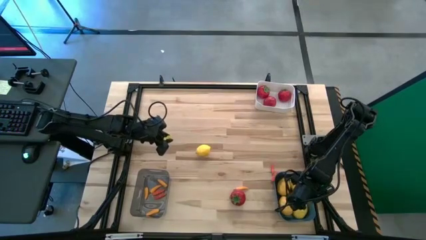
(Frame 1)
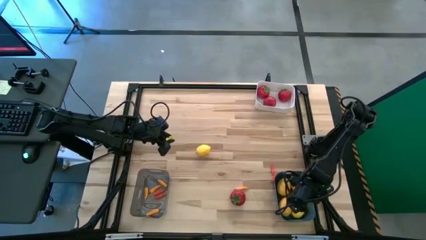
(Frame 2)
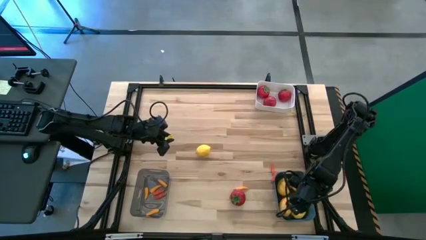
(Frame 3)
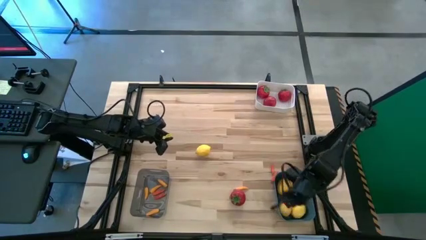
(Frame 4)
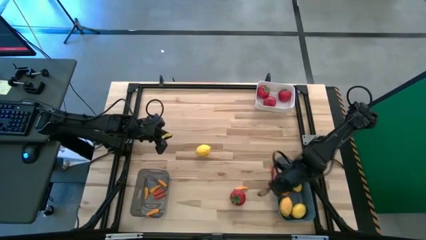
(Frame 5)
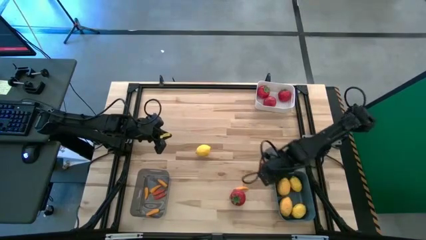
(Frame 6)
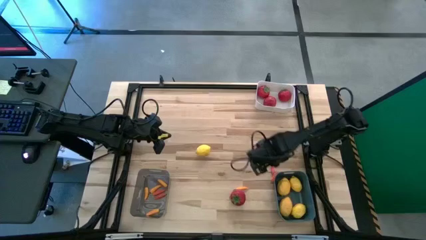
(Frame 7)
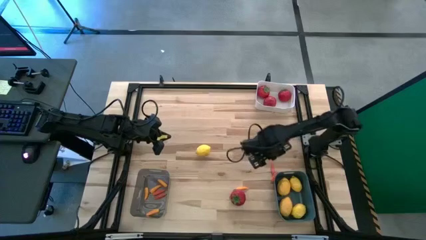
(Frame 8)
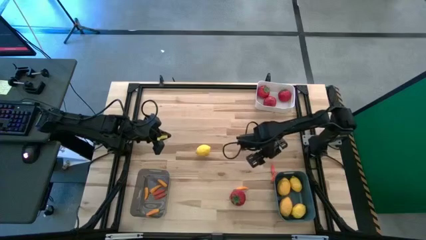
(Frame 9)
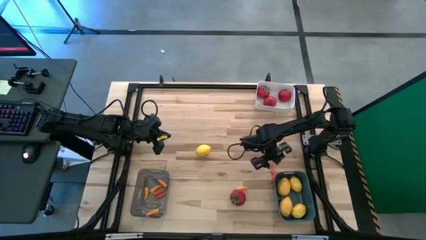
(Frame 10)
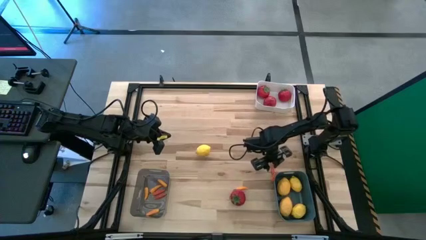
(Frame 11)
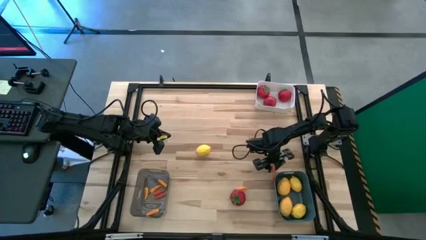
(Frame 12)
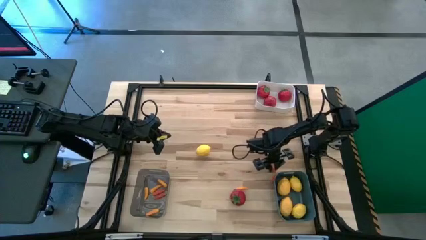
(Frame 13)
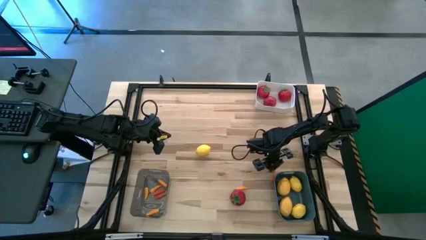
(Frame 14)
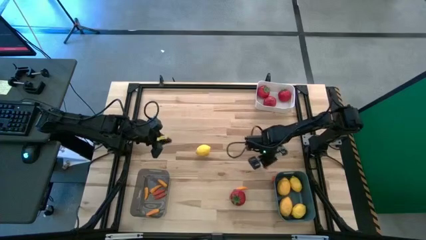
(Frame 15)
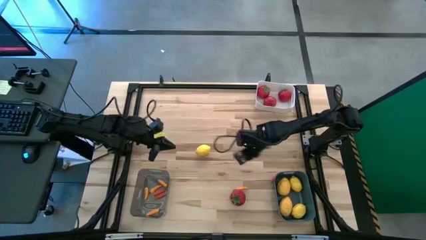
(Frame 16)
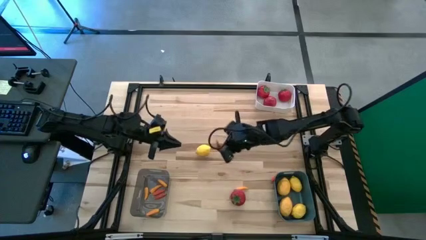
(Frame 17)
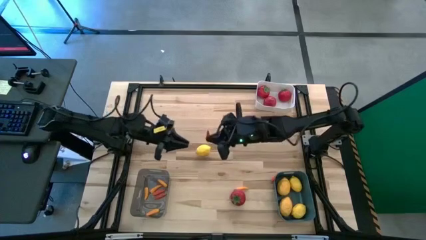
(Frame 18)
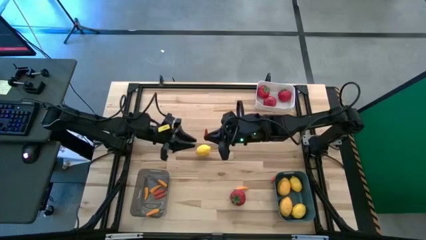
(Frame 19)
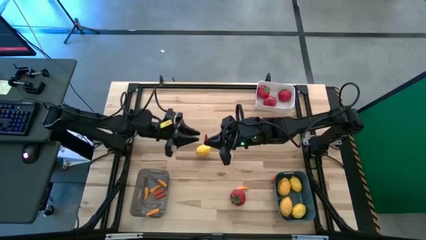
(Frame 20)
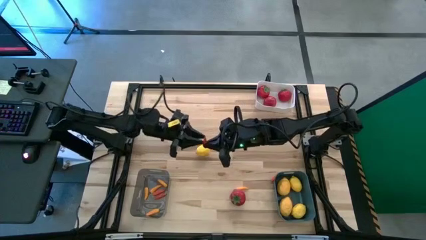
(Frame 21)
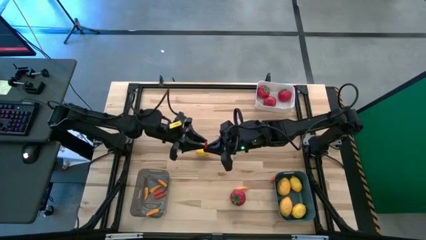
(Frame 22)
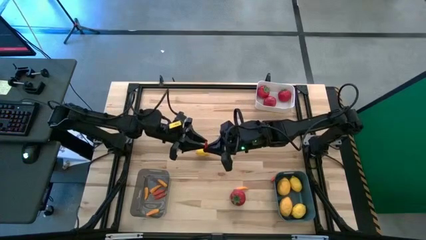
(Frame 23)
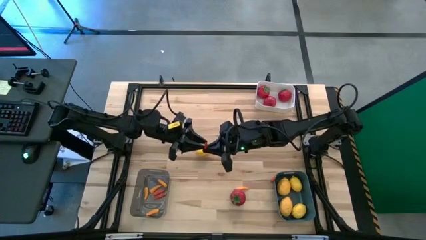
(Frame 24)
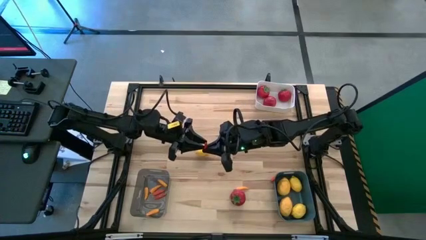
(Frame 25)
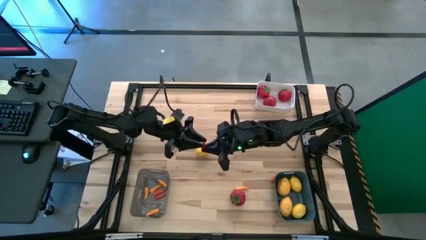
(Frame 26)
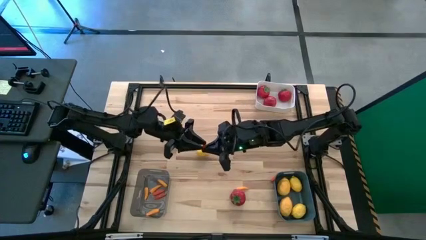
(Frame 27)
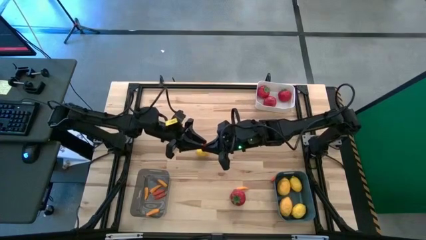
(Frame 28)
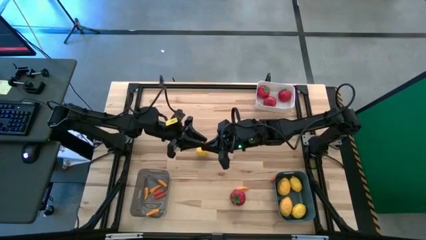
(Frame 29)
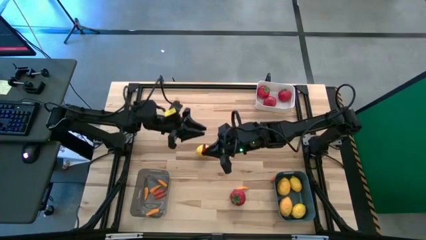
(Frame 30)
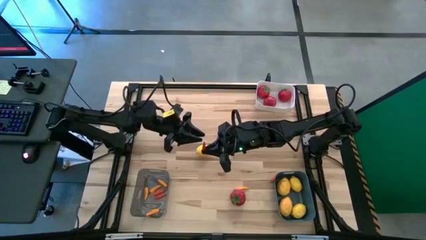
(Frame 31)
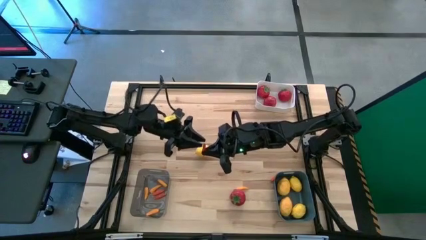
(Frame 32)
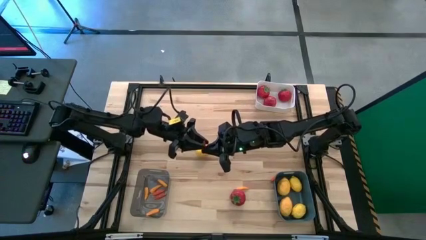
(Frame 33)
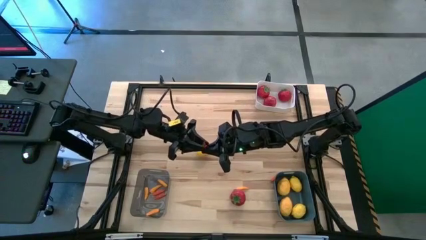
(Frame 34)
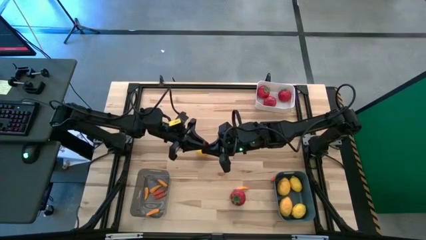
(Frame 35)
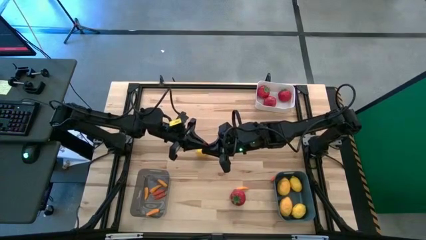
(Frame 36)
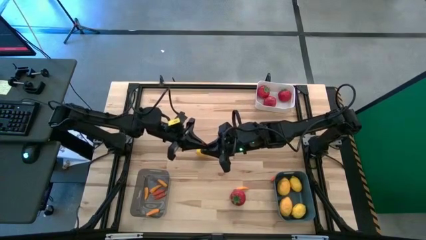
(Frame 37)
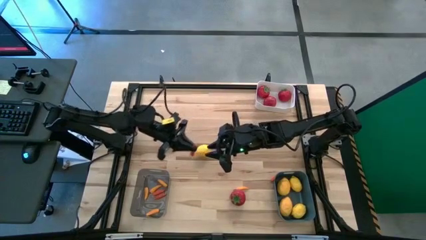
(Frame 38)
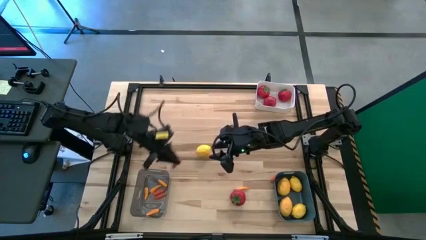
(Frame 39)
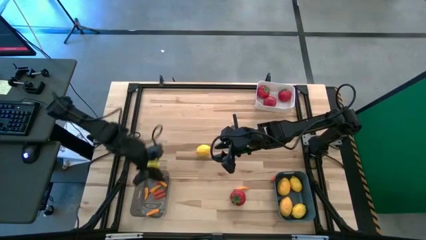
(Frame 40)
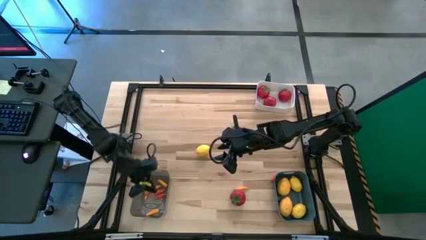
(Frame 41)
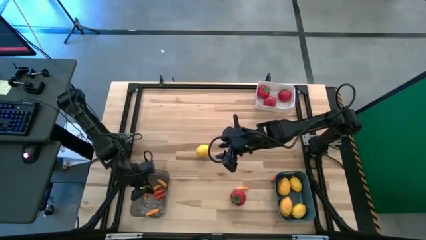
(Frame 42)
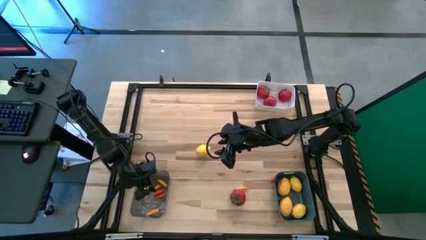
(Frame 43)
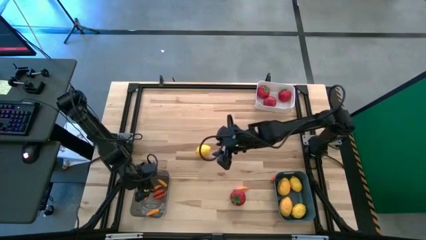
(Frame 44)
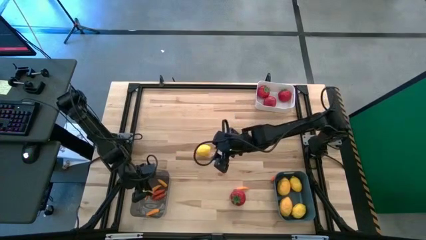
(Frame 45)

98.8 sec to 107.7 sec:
Task: Sort produce into baskets
Put the orange chili pepper into the black bin

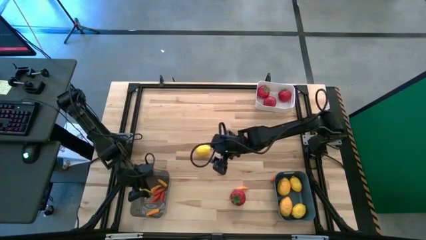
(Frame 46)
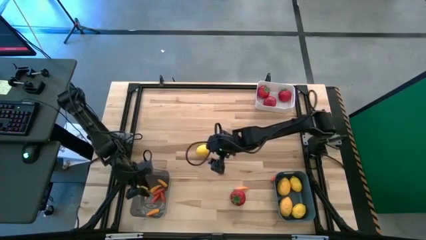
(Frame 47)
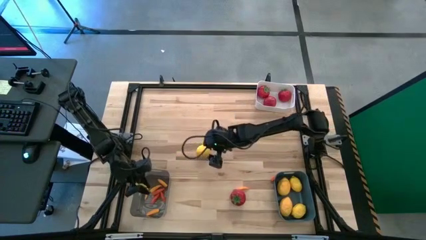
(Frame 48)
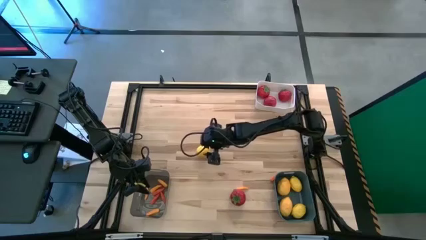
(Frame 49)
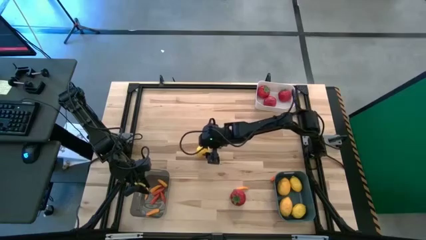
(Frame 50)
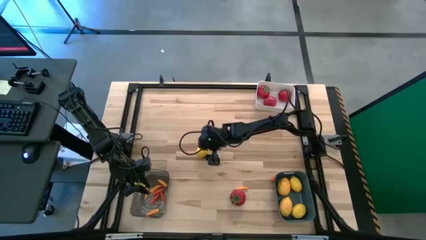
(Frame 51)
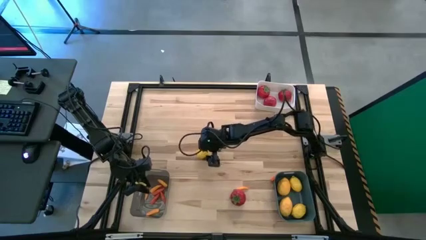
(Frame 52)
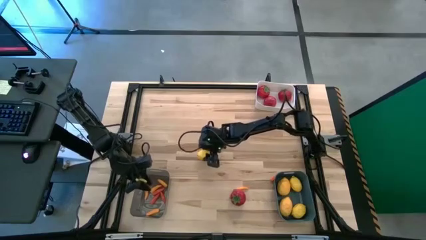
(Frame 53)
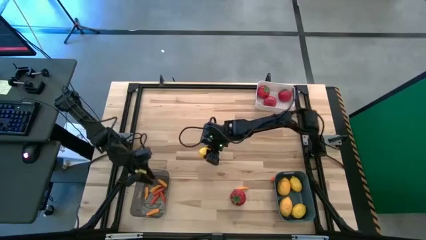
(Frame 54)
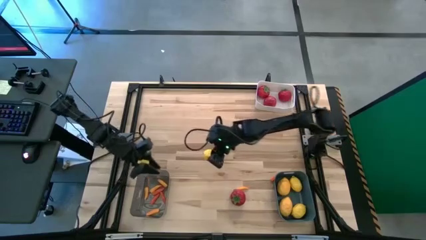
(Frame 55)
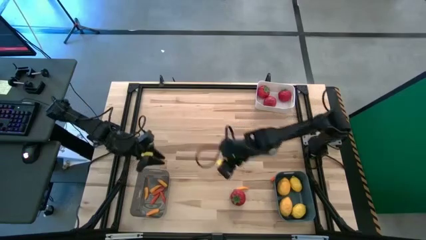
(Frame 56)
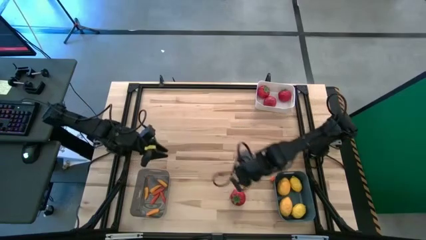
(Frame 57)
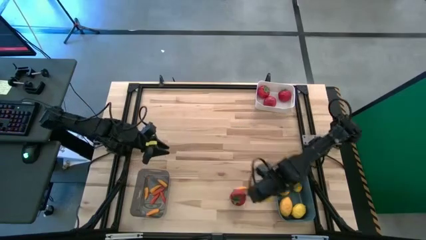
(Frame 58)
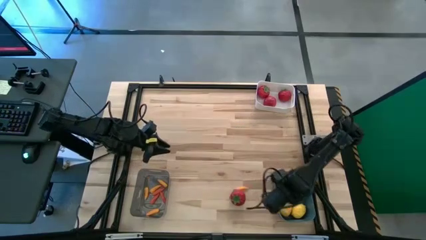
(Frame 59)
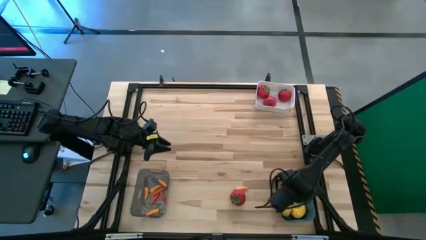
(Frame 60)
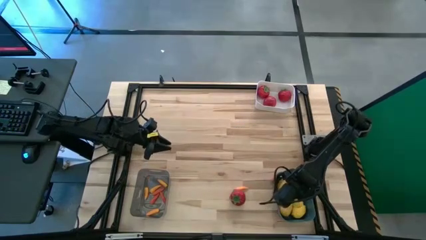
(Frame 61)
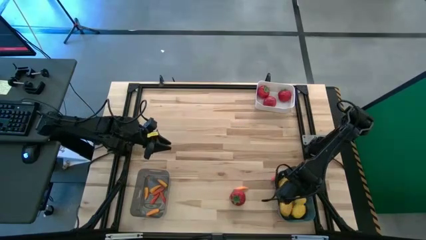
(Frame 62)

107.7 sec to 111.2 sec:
Put the lemon into the blue bin

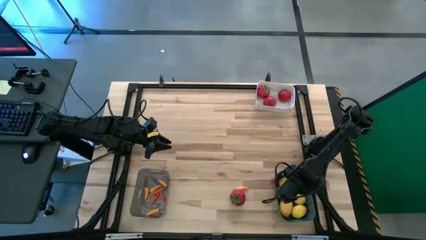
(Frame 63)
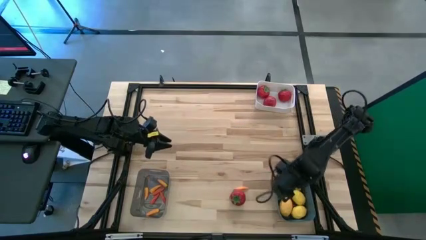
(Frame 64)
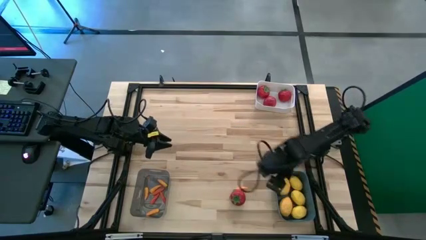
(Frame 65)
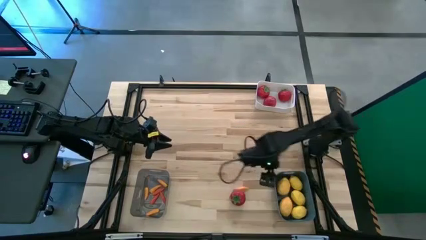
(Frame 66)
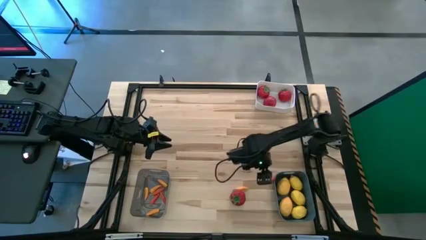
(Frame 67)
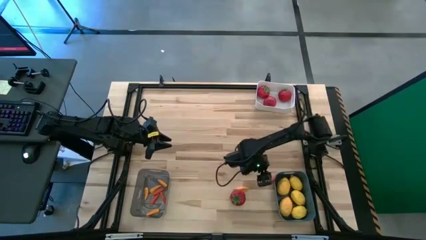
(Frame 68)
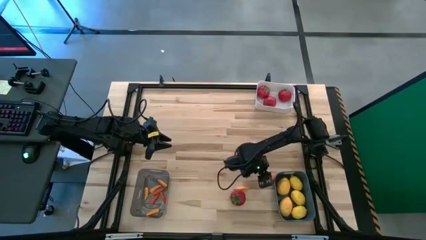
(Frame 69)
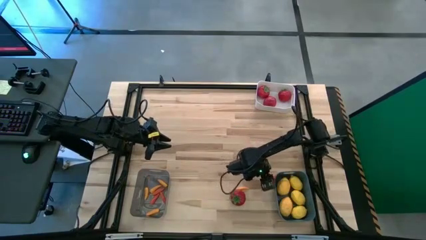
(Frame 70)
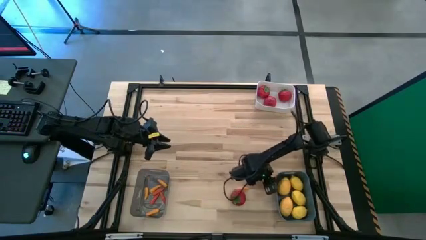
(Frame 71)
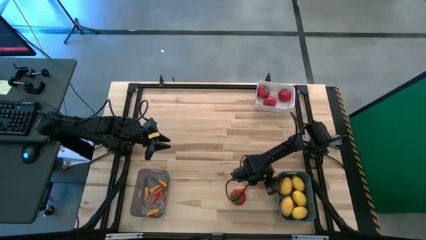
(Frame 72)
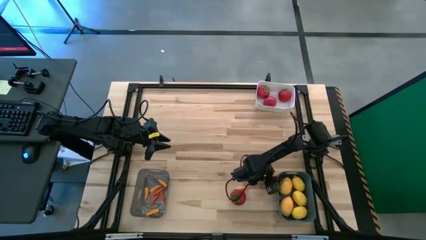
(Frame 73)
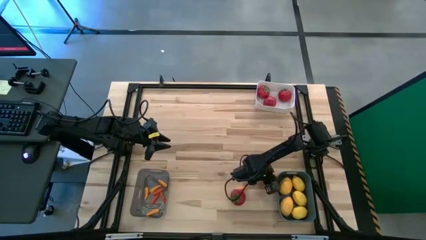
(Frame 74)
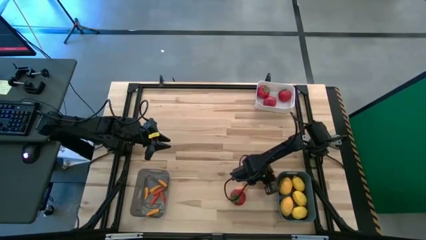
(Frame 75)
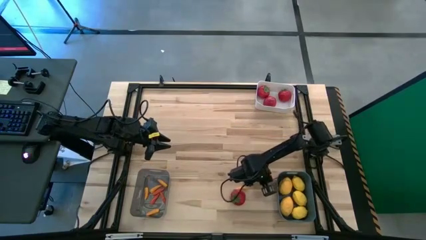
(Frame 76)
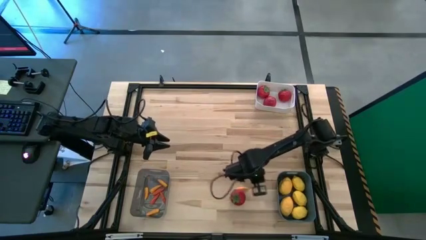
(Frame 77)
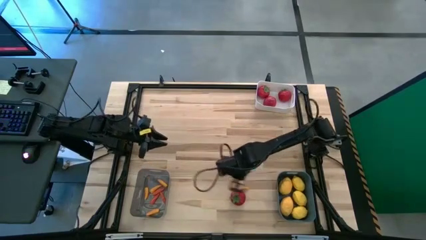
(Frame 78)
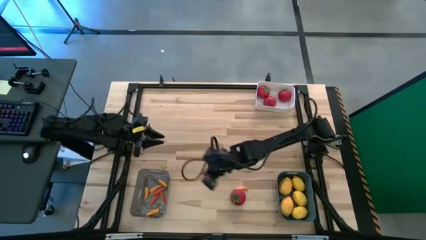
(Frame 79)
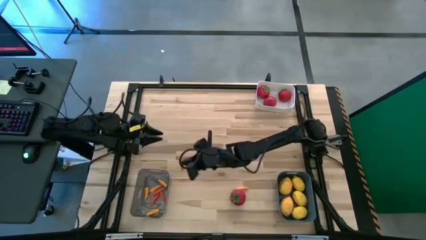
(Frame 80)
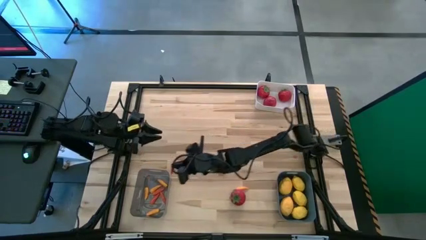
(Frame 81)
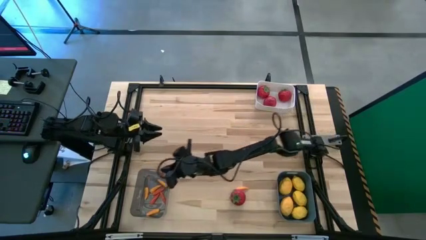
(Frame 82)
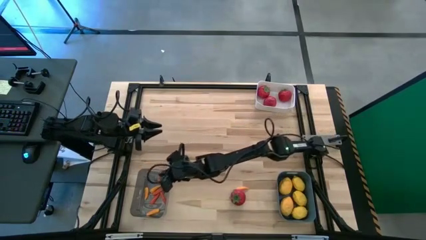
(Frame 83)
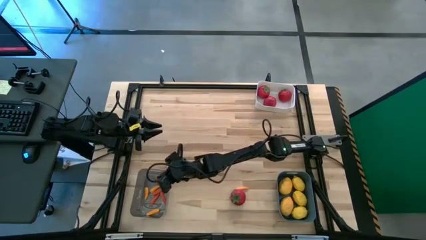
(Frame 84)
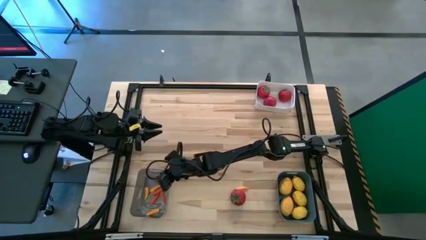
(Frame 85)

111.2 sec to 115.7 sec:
Put the orange chili pepper into the black bin
